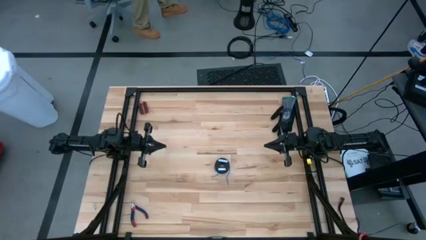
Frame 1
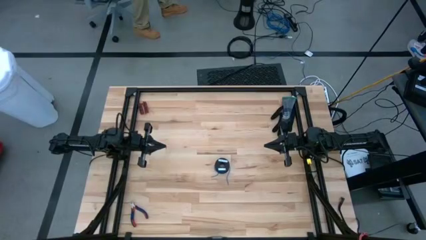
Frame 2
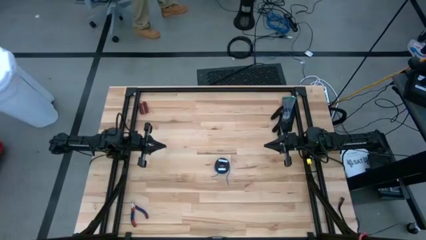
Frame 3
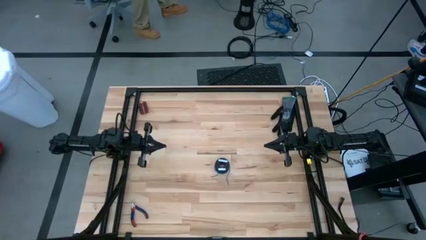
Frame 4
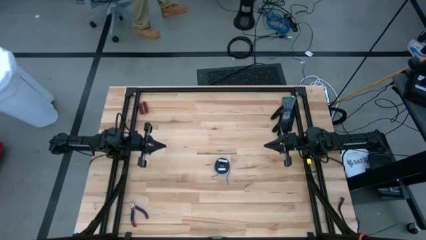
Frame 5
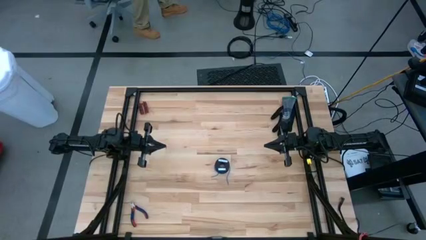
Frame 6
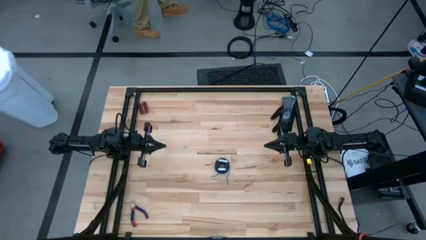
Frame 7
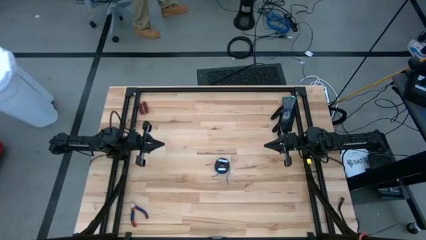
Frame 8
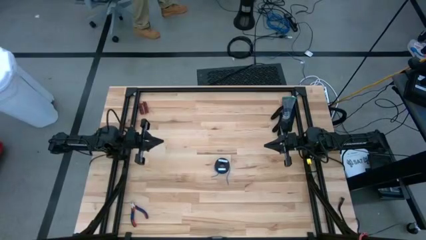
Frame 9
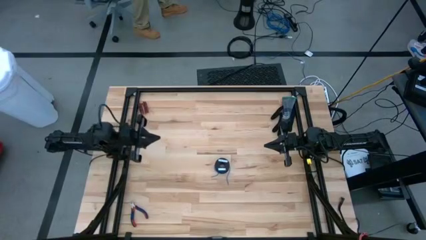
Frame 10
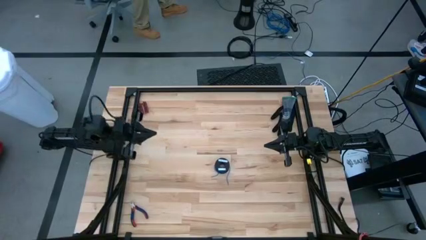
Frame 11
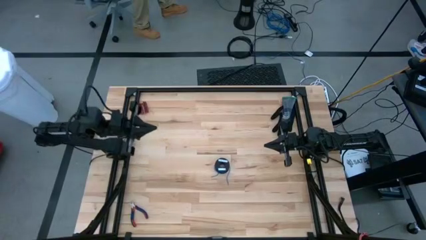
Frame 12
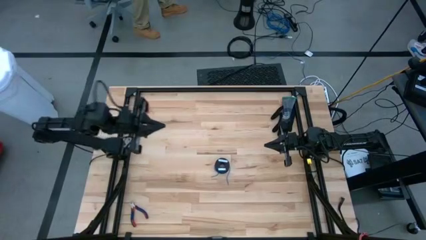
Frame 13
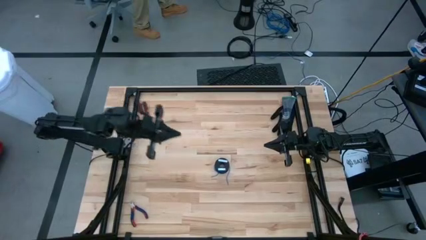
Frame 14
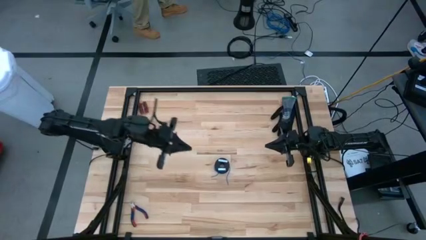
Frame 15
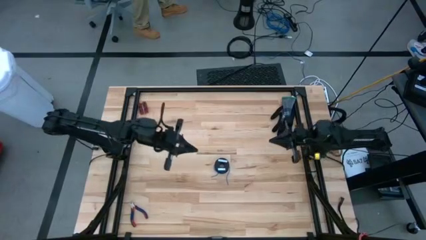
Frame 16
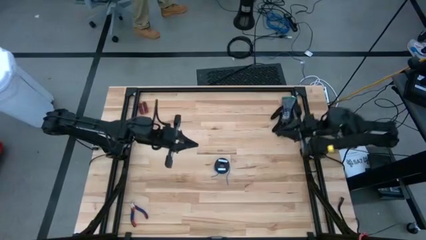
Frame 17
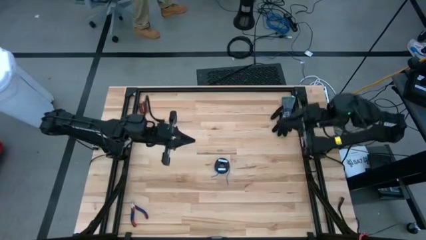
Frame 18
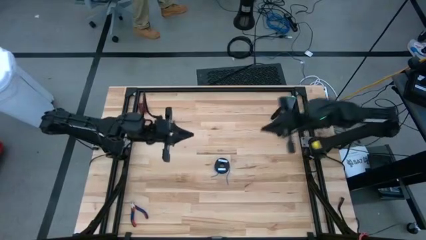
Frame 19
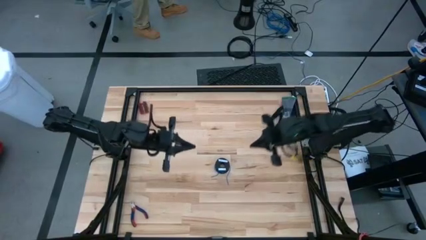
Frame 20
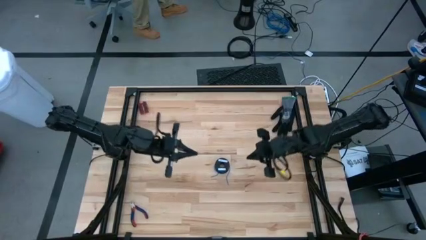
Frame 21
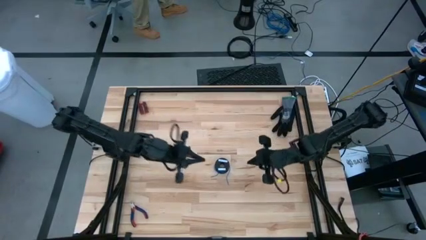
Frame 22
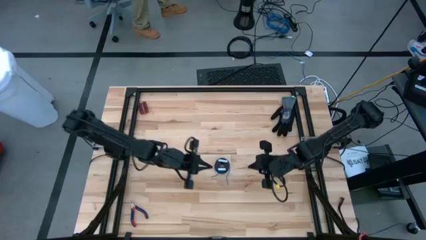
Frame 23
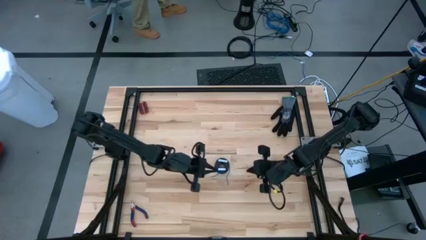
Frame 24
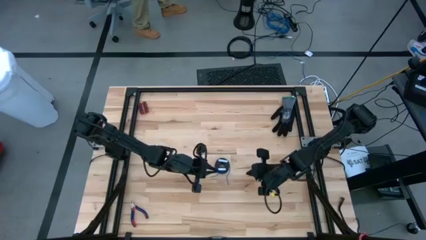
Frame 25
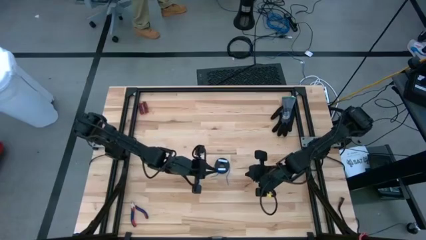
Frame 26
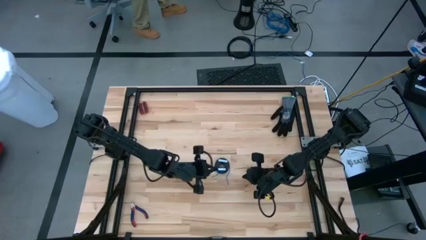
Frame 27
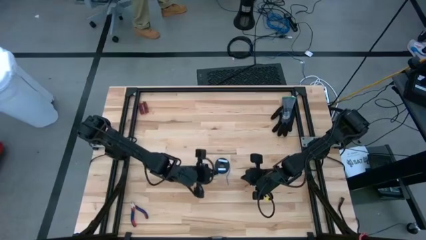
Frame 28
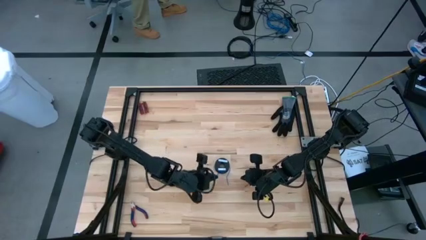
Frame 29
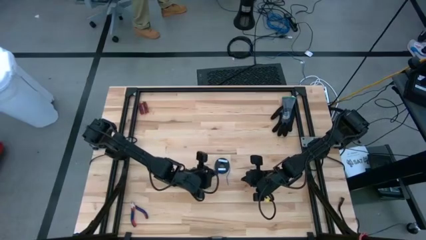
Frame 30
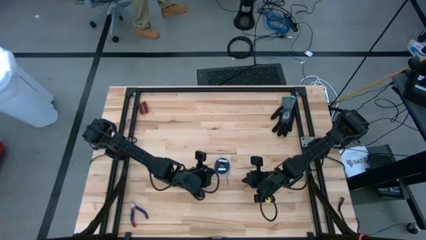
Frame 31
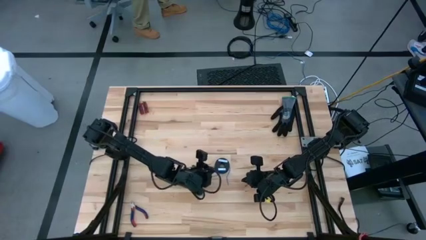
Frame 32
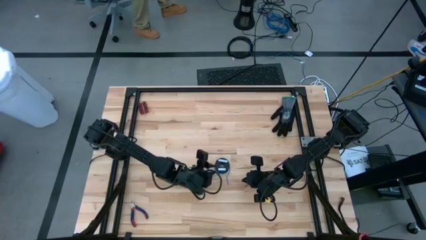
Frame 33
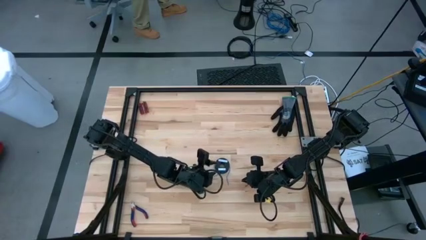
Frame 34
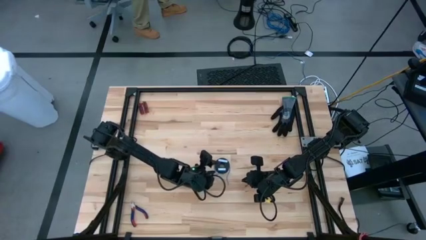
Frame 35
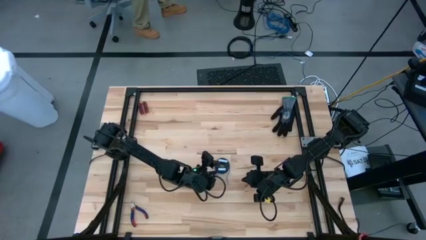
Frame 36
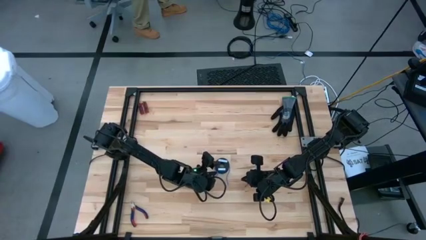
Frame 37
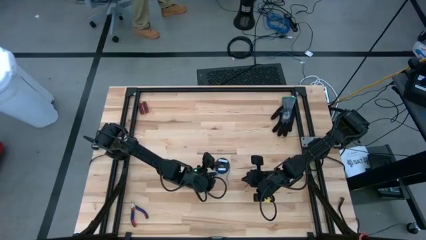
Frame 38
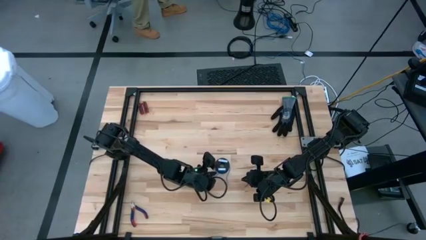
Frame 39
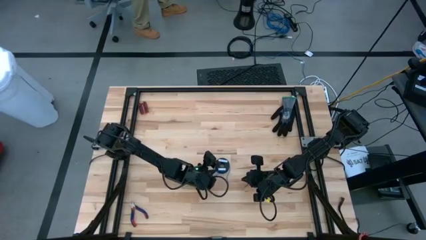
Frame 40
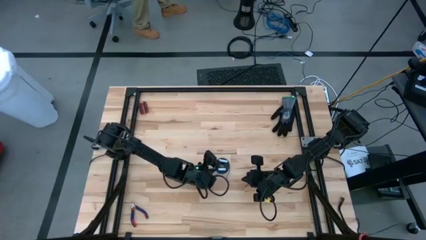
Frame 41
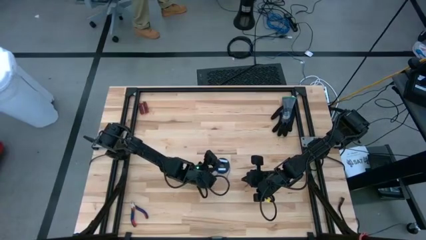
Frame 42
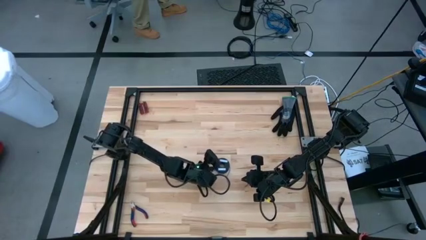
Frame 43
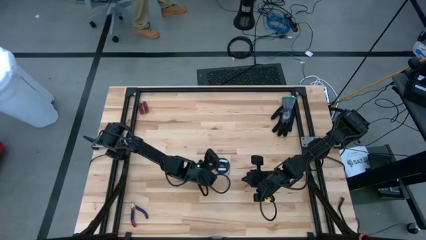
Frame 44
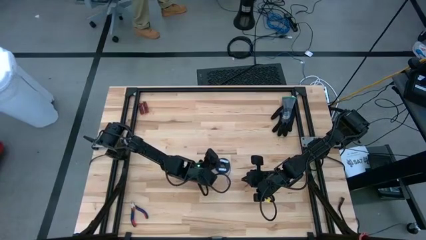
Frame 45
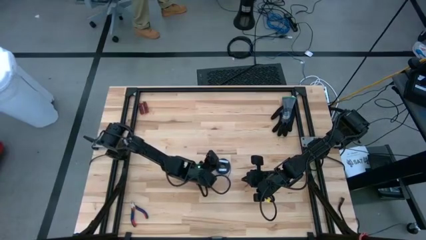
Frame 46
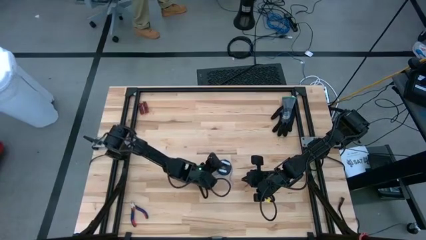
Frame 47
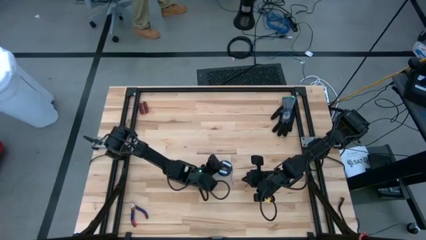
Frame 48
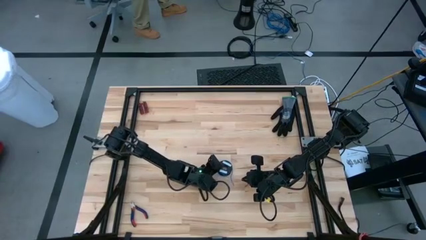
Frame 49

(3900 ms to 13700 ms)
Task: Coil cords
Uncoil the blue wire from the spool

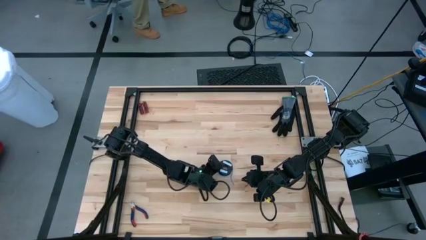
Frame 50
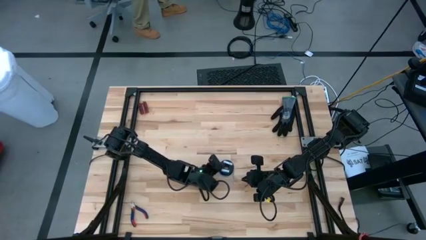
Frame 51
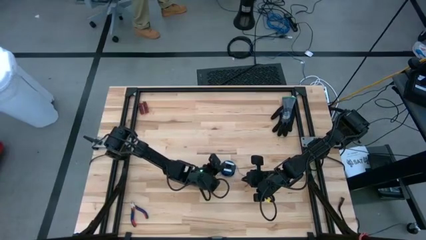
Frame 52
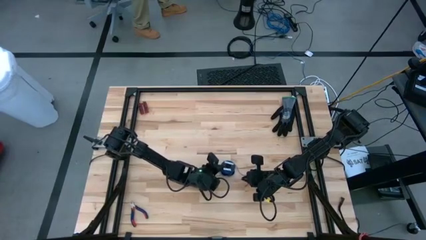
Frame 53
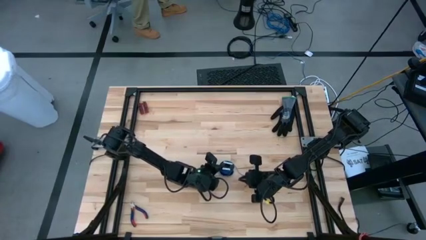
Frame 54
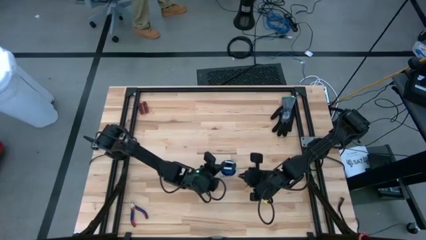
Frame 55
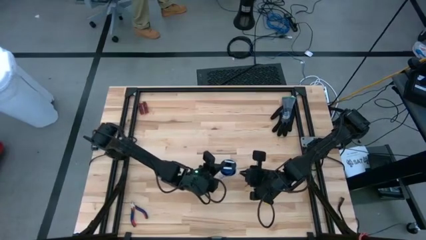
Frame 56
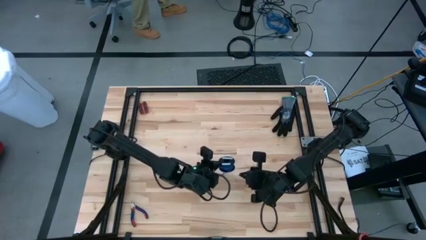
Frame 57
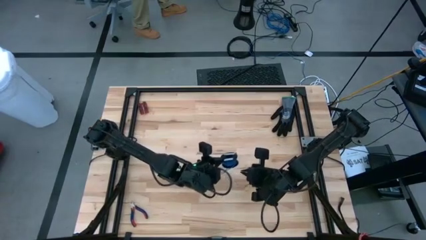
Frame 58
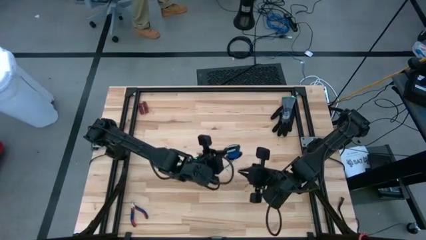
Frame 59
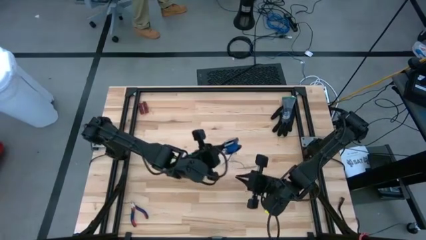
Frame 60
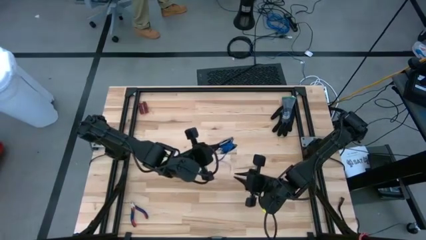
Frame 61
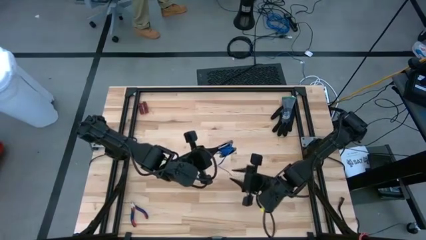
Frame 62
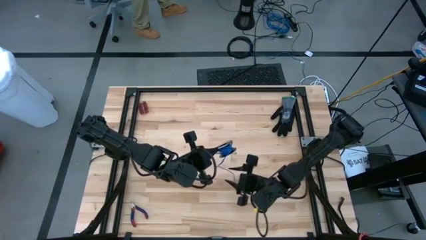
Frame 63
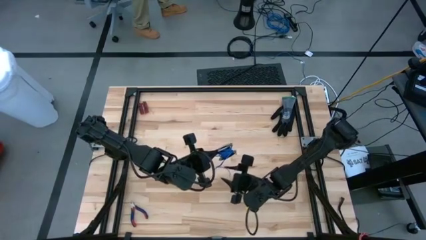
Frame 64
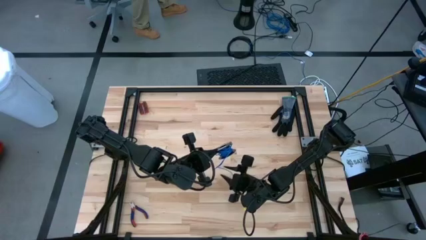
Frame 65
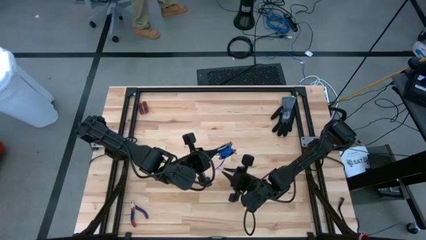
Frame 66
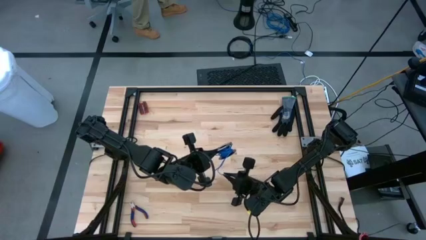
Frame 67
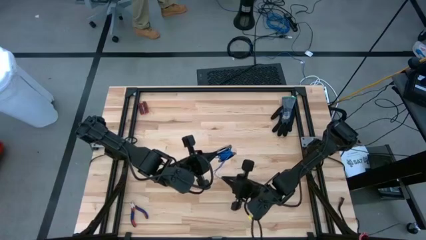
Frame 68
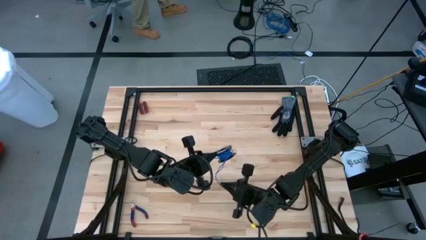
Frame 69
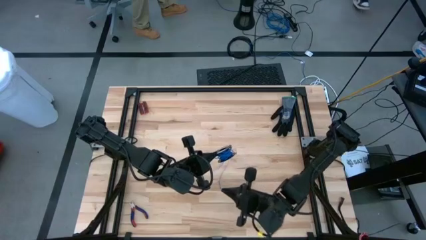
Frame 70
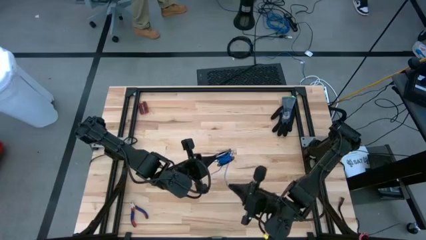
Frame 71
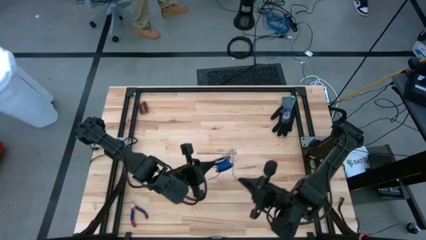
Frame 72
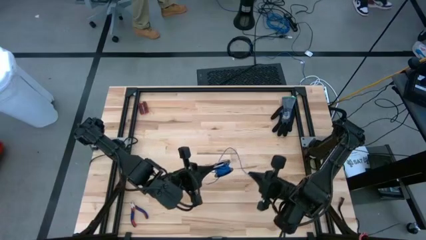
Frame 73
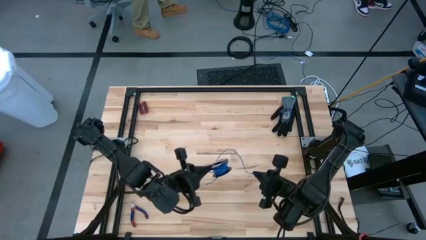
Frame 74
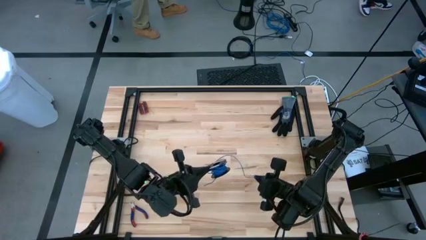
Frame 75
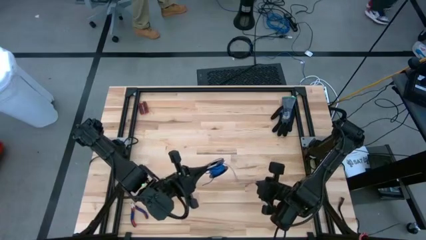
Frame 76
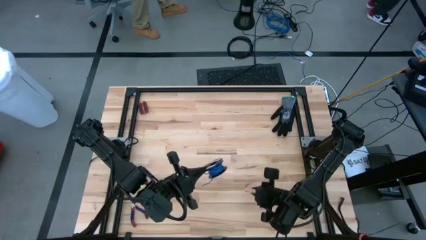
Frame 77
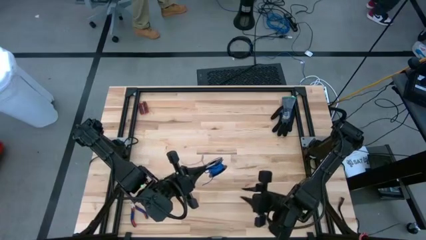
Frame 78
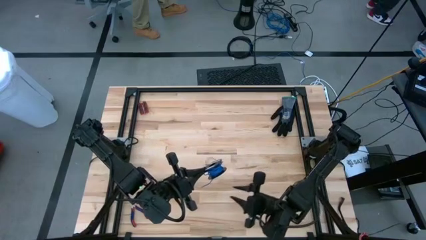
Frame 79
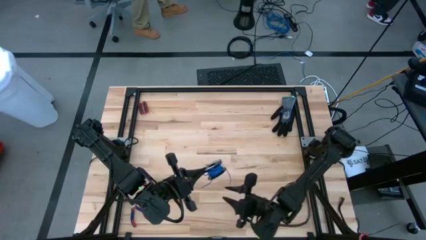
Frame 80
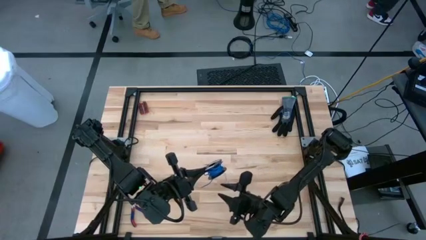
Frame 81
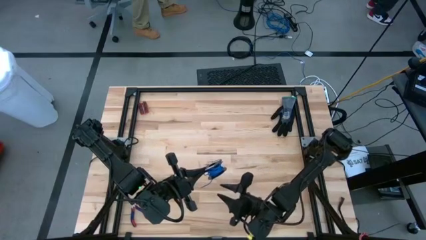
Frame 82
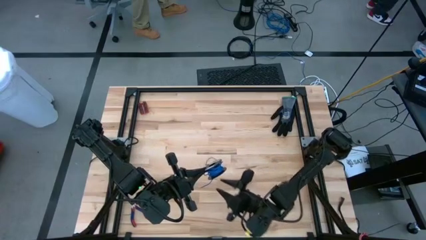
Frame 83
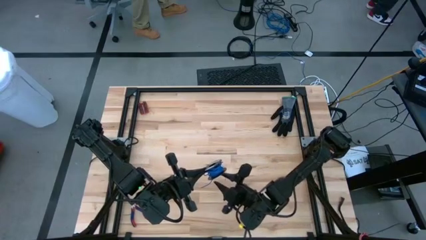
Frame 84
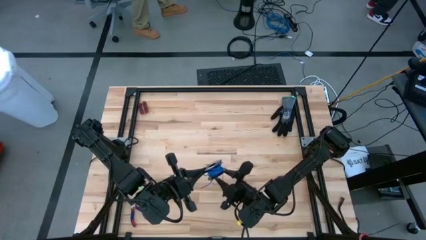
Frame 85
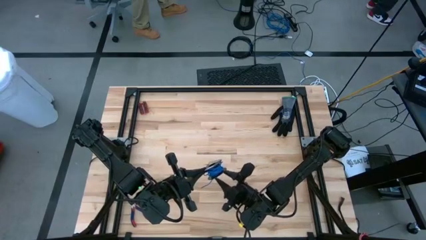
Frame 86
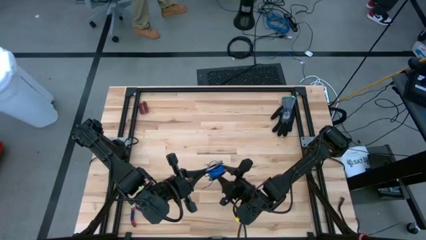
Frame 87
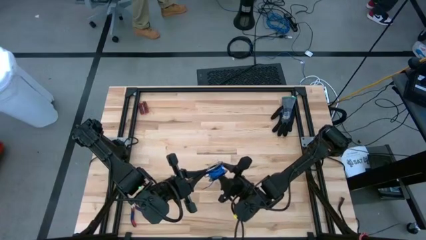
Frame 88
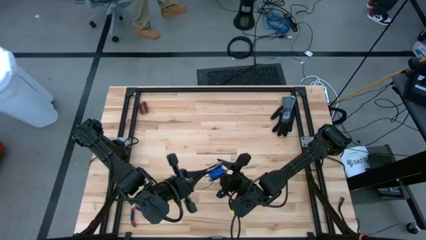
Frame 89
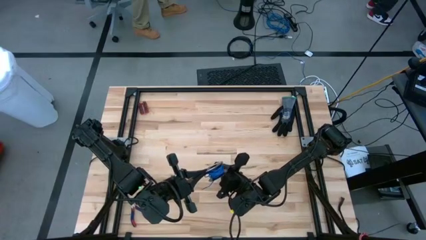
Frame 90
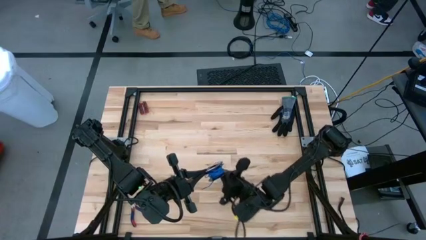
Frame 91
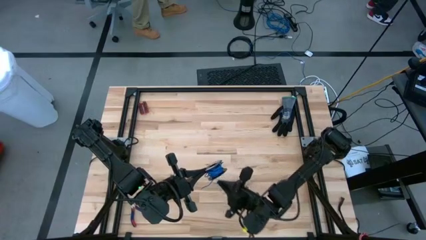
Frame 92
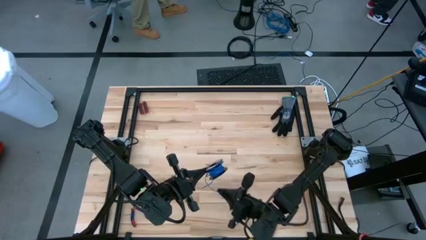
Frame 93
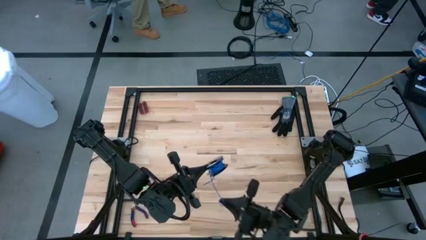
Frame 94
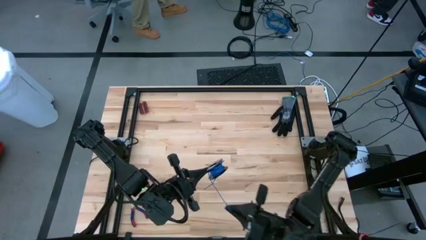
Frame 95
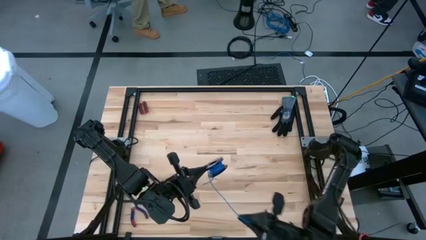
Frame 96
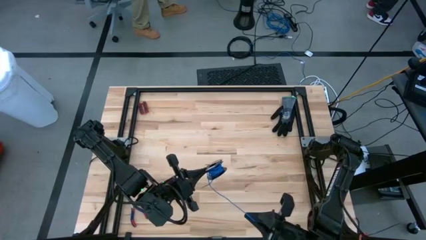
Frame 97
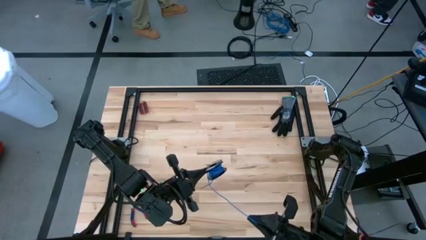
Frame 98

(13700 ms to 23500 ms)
Uncoil the blue wire from the spool
